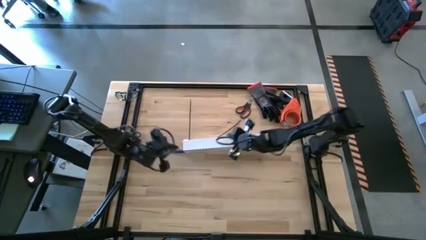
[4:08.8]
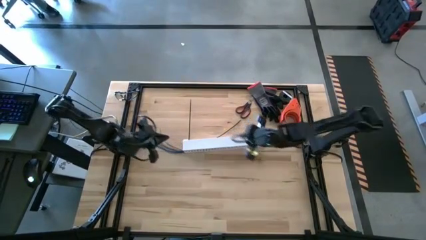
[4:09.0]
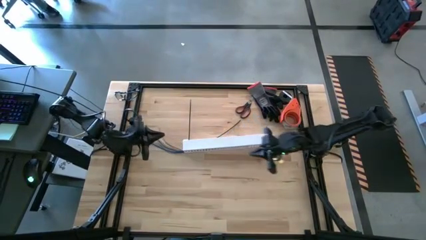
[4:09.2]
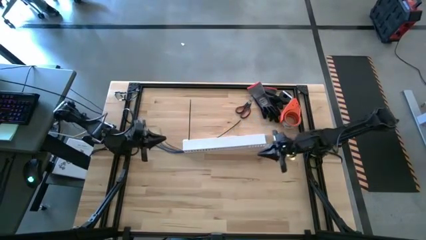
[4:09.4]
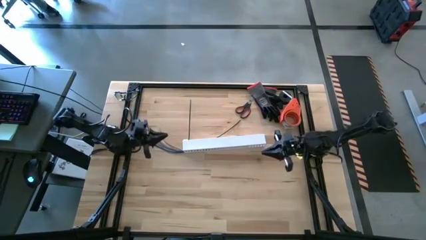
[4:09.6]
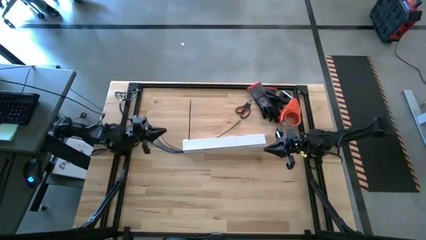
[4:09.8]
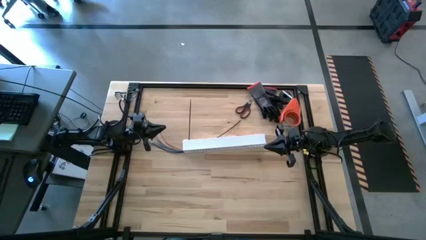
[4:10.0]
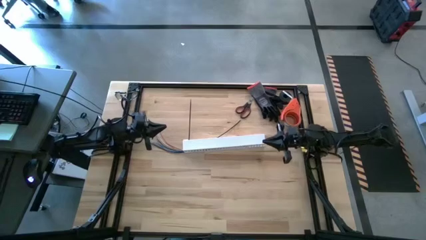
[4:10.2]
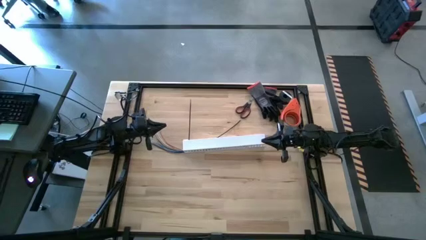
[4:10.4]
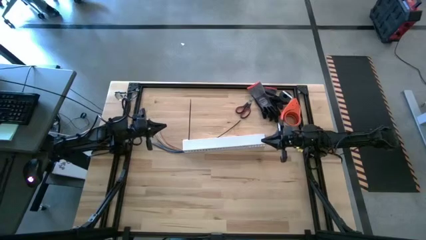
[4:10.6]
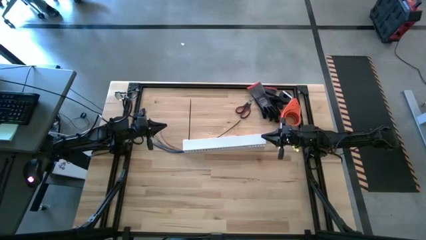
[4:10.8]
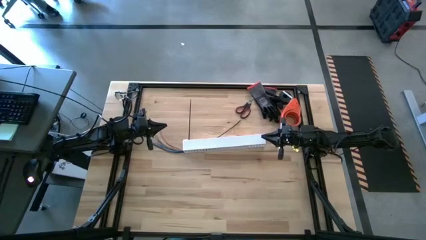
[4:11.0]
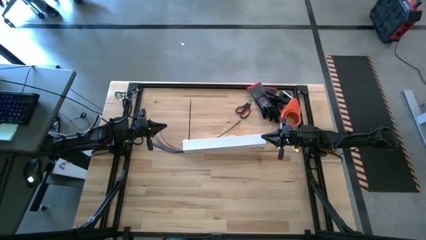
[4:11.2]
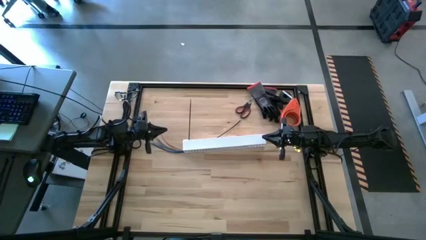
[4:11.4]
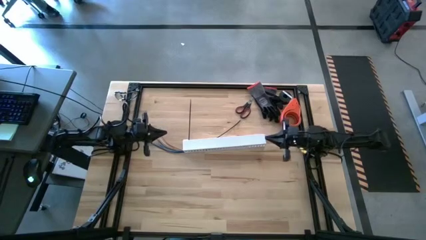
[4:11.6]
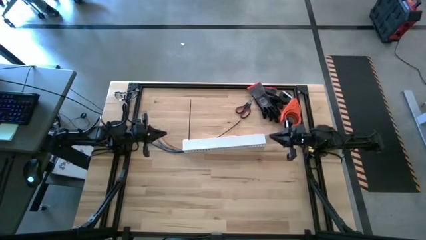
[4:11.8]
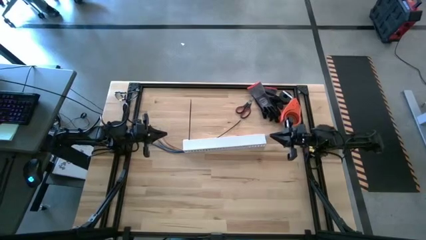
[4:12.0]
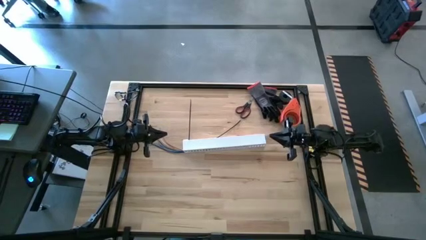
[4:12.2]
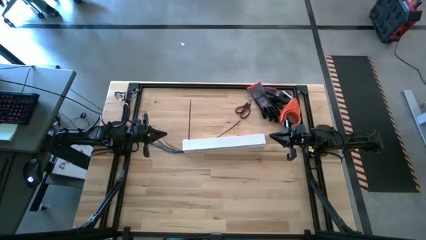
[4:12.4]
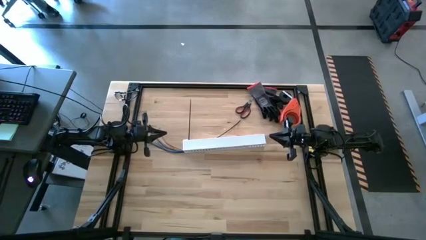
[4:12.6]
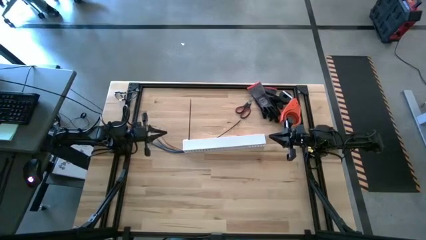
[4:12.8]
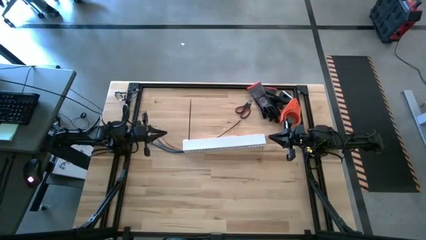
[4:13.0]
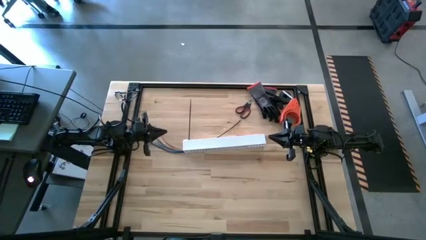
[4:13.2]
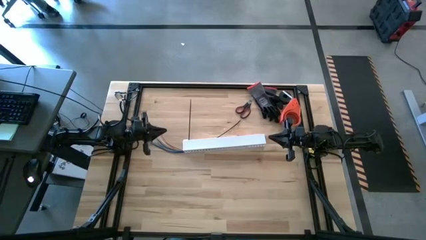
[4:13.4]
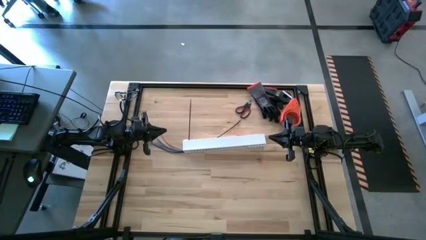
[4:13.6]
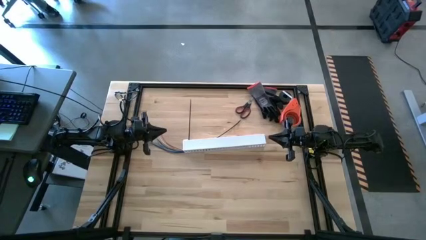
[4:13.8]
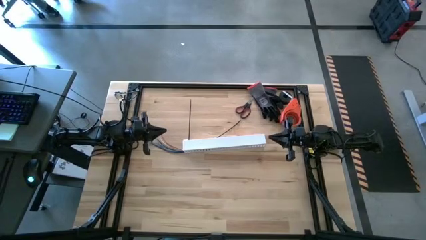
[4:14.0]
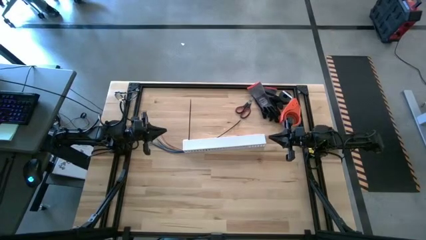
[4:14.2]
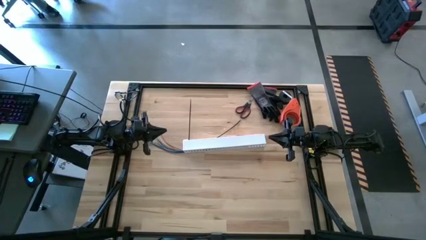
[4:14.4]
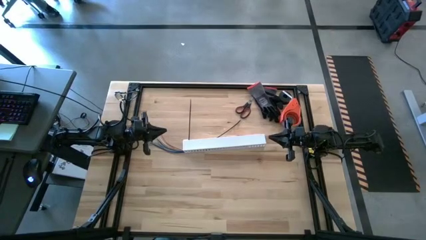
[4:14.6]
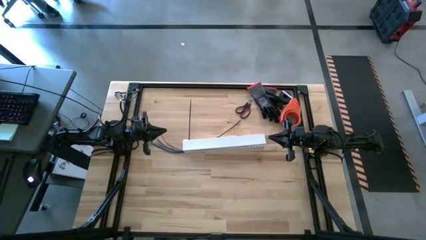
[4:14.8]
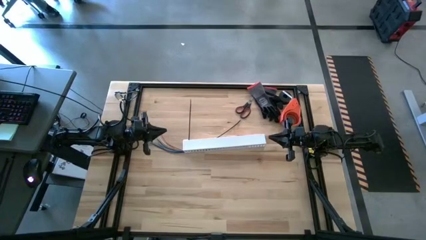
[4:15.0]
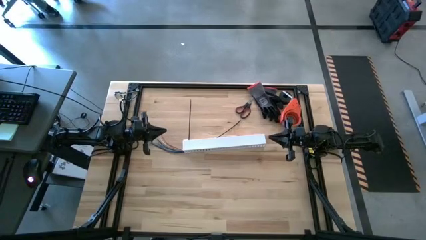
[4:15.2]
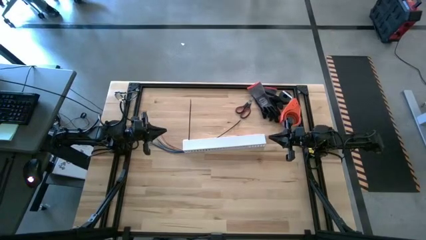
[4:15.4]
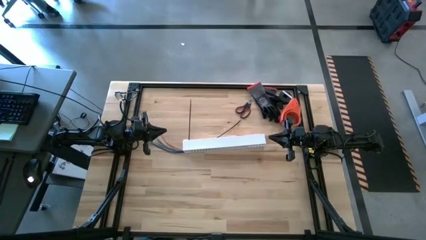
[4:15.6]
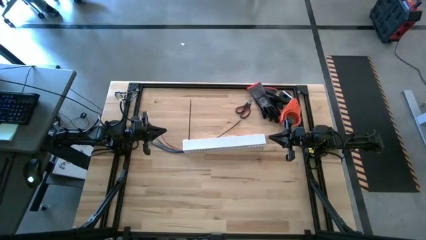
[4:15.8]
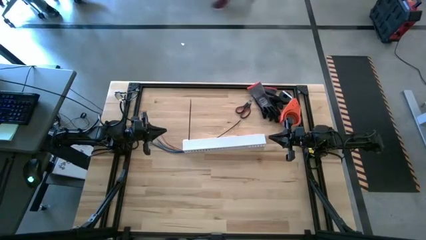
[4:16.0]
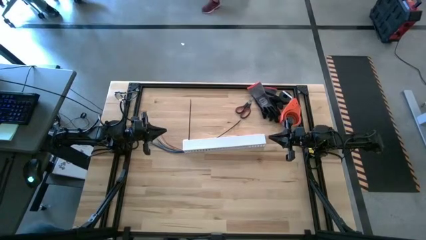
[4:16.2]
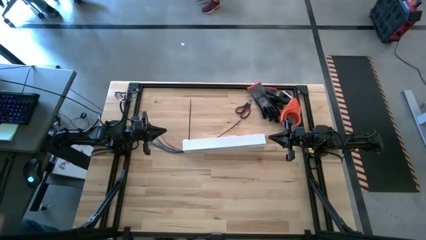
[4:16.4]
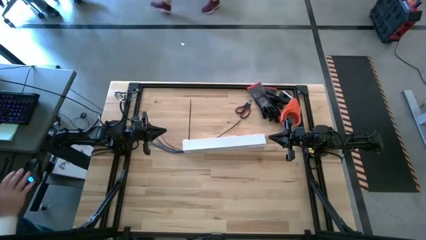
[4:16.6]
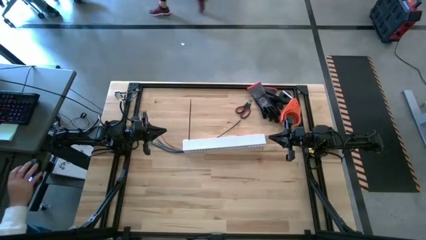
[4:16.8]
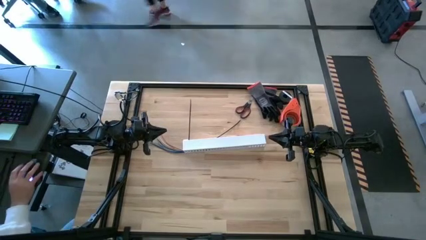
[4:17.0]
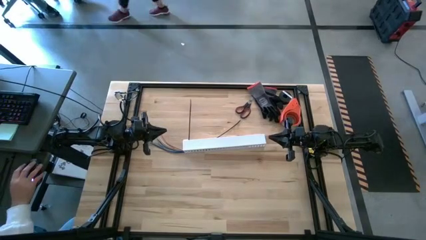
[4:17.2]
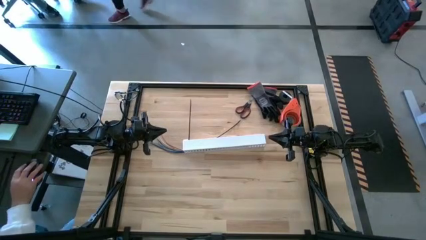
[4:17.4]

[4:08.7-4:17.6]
Task: Ziptie cables
Return to Home Position

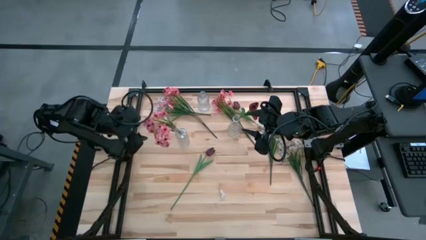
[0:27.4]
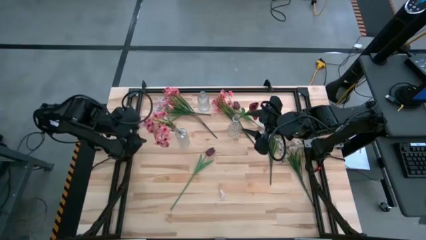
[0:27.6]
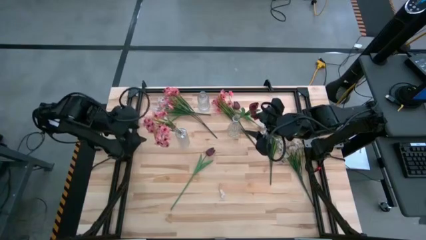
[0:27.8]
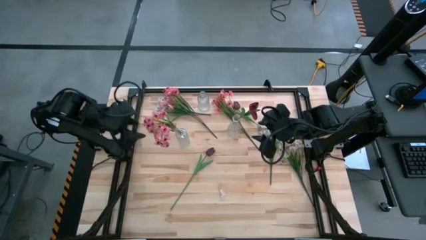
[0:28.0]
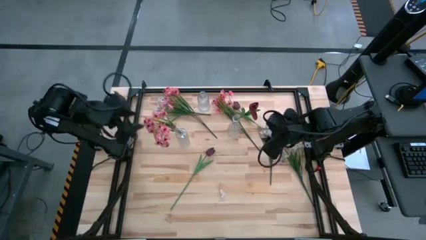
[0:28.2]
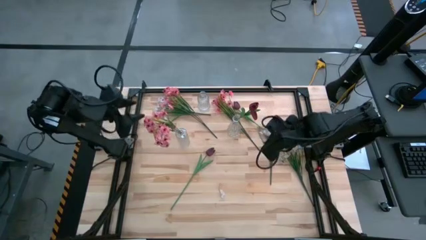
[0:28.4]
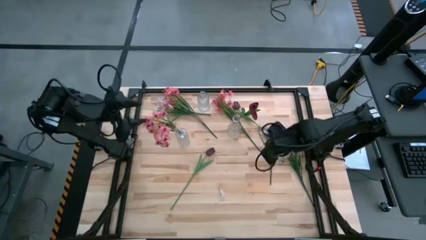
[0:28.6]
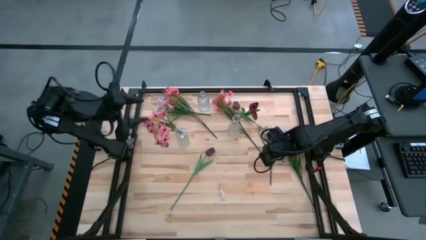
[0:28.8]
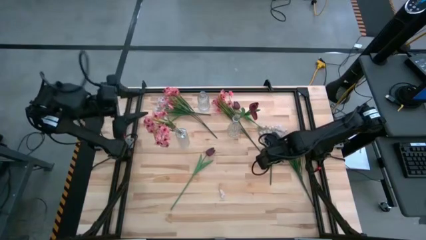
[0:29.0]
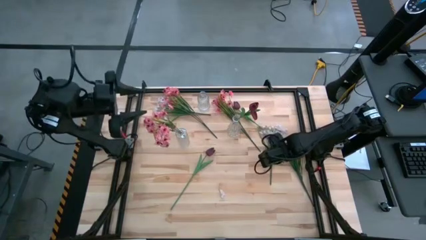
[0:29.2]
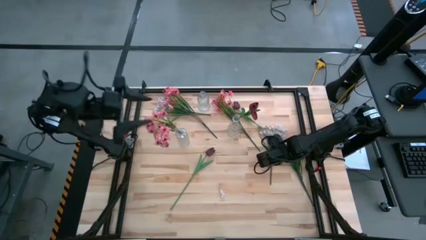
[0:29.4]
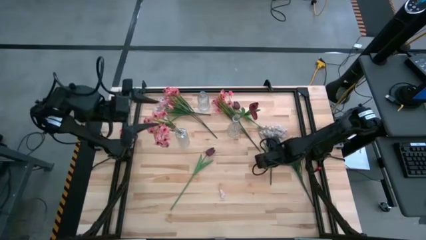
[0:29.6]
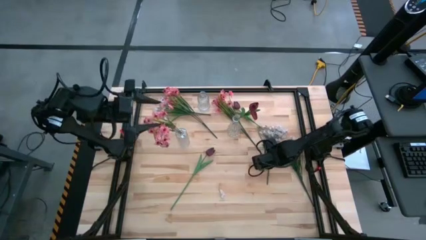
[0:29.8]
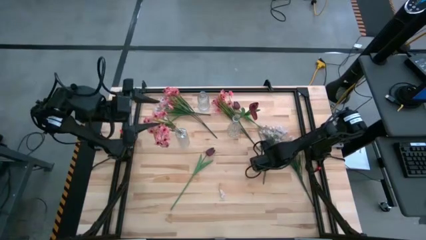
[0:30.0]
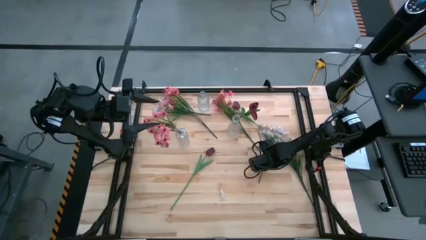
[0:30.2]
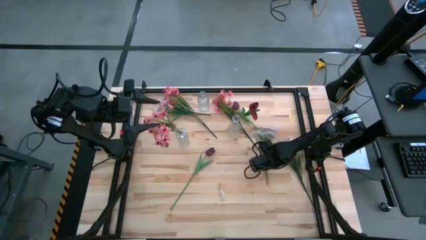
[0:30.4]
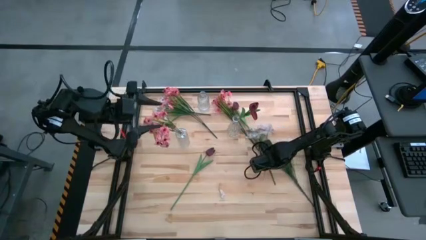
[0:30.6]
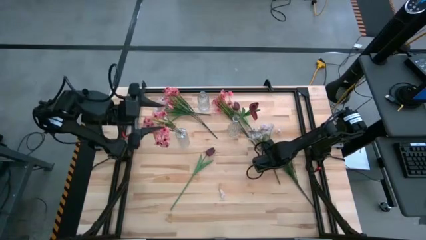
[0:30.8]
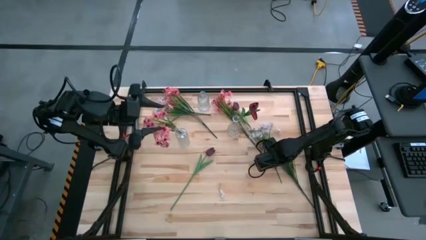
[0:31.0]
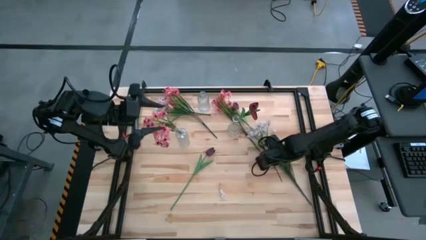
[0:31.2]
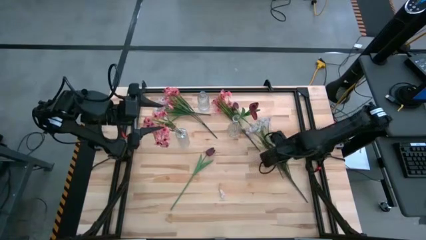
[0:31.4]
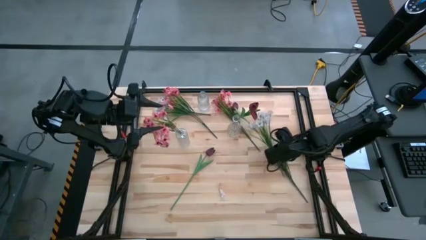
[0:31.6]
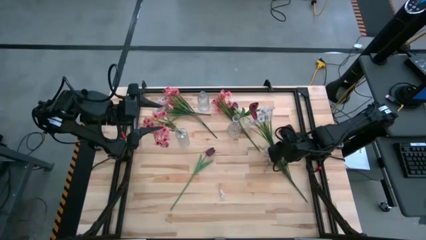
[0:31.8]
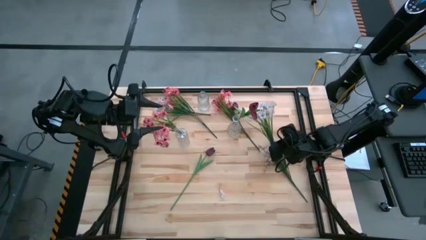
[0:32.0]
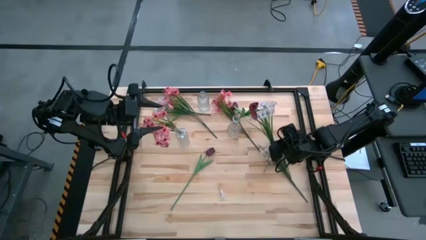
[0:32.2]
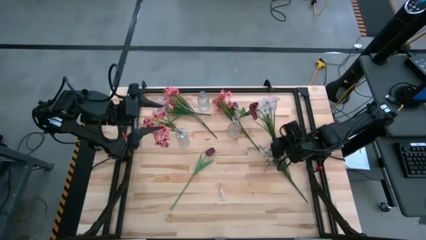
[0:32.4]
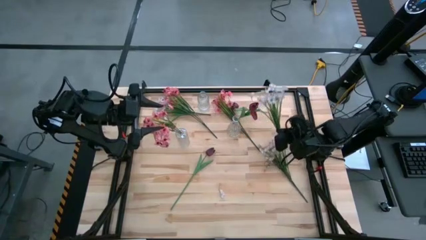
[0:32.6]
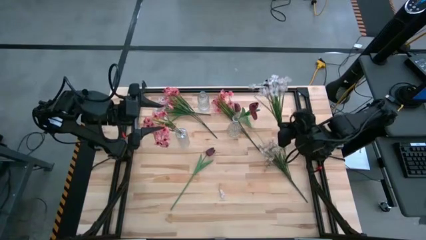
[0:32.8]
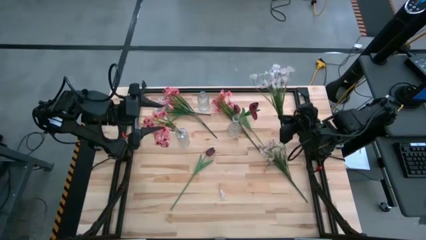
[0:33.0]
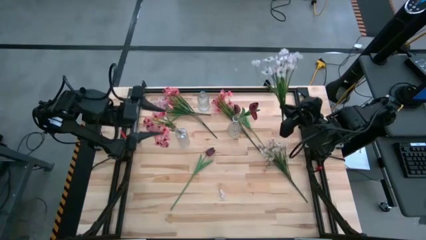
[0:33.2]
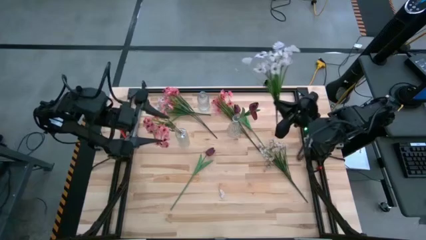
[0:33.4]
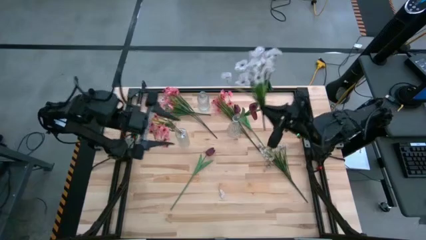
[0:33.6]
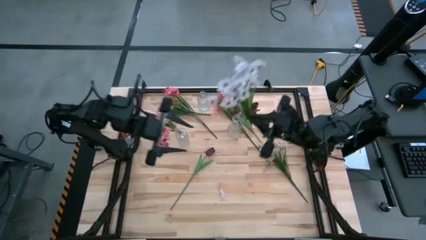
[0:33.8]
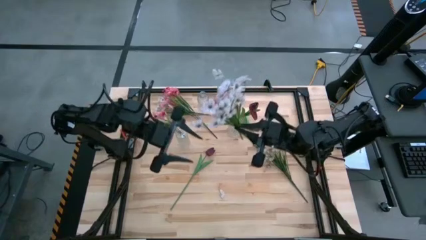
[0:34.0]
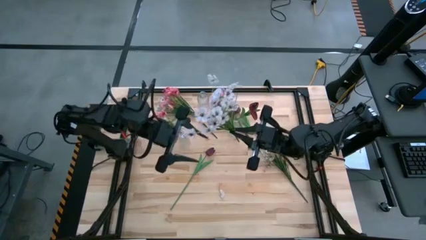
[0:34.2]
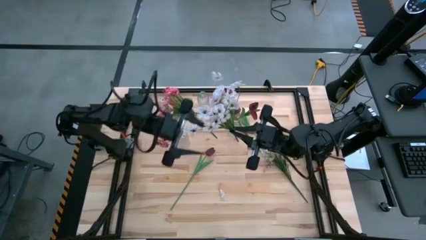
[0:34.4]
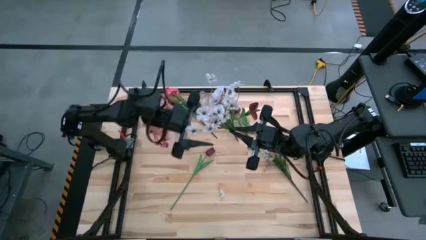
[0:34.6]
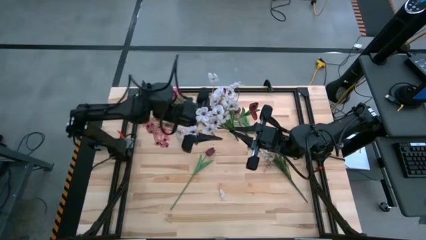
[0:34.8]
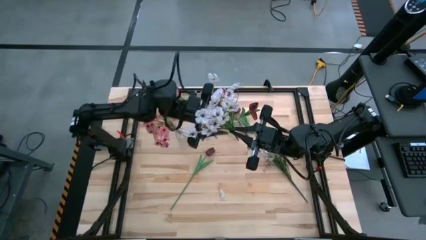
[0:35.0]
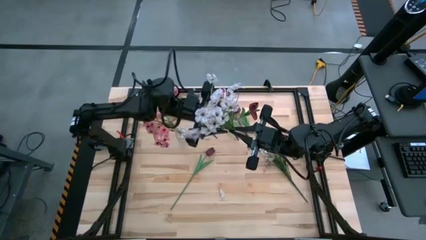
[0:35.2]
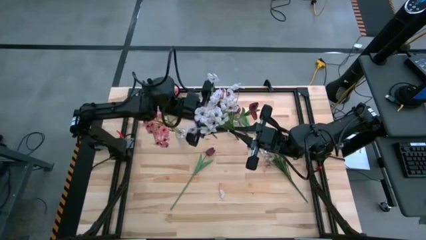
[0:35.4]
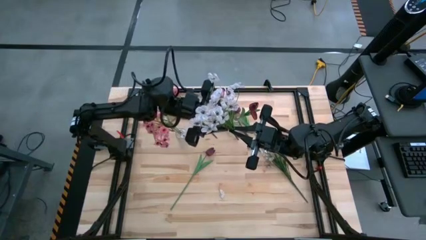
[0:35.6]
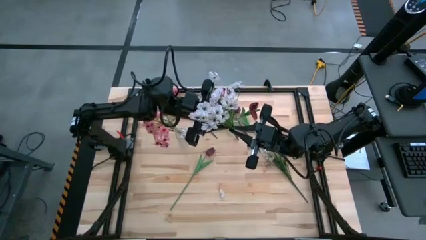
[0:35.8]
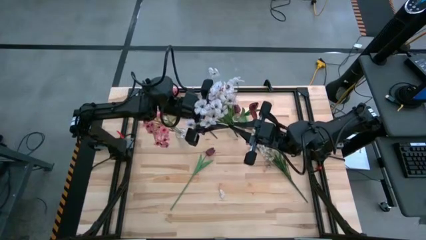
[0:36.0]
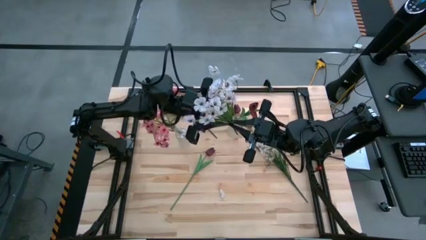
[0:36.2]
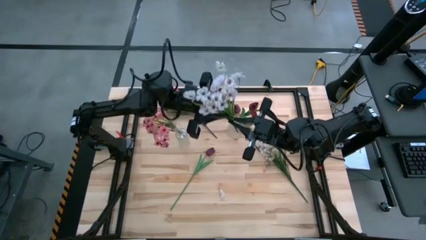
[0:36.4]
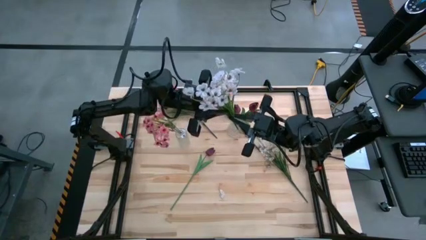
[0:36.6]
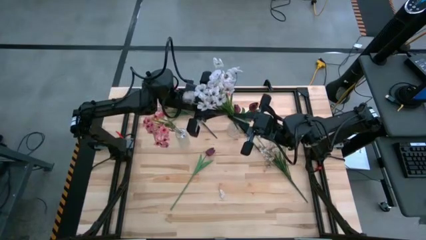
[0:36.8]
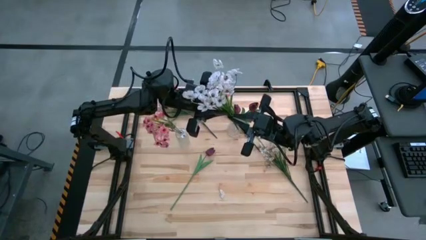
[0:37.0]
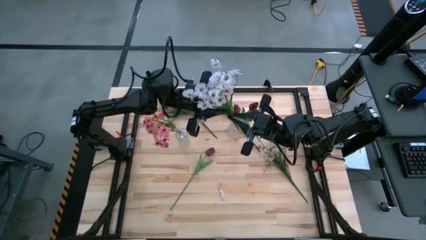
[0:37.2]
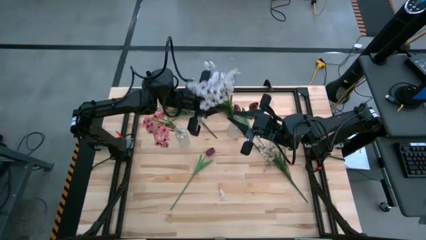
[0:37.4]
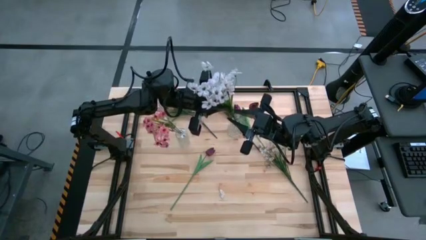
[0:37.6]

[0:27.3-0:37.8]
Task: Sort flowers into vase by color
Put the center white flowers into the top transparent vase
